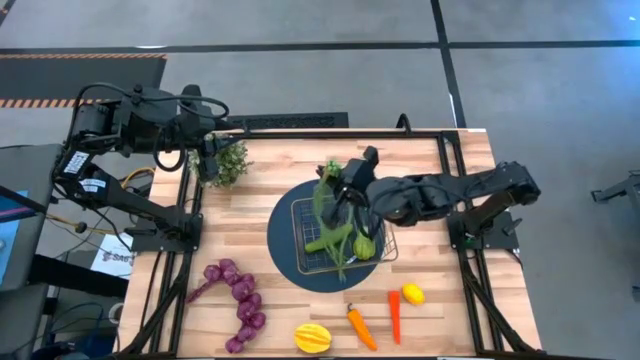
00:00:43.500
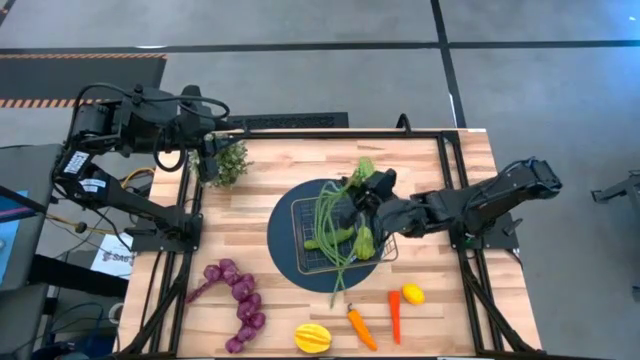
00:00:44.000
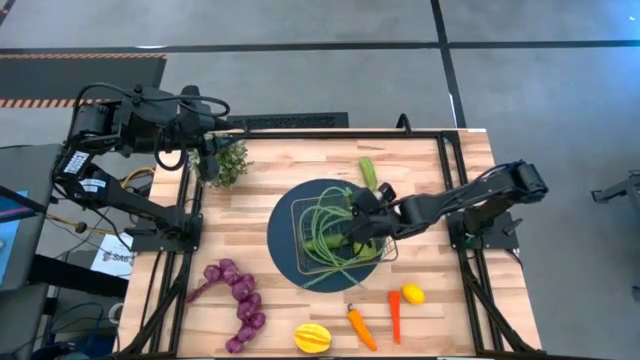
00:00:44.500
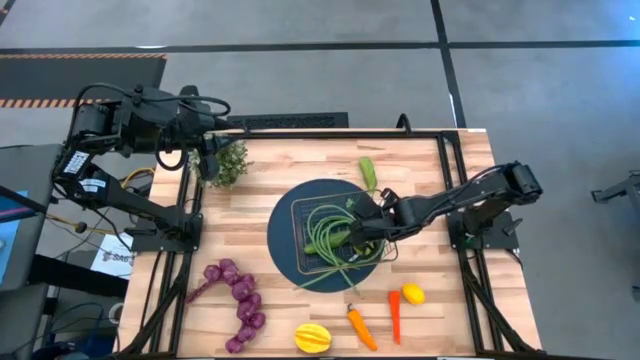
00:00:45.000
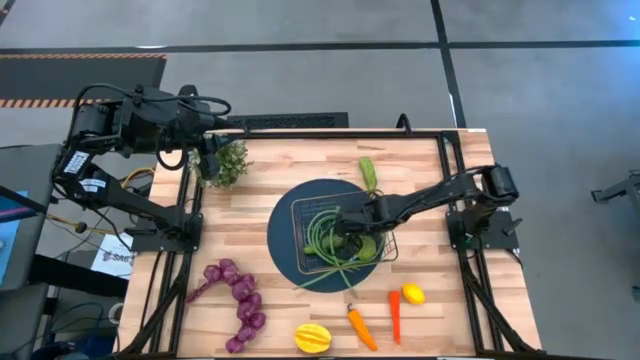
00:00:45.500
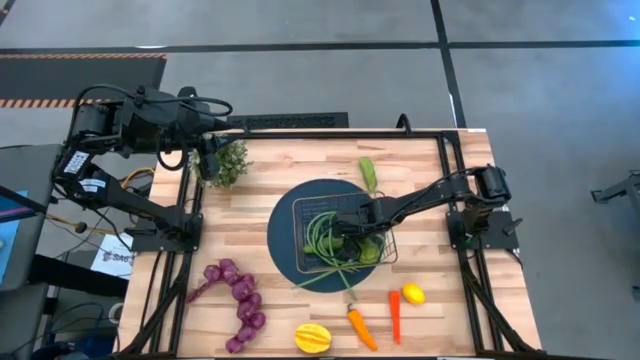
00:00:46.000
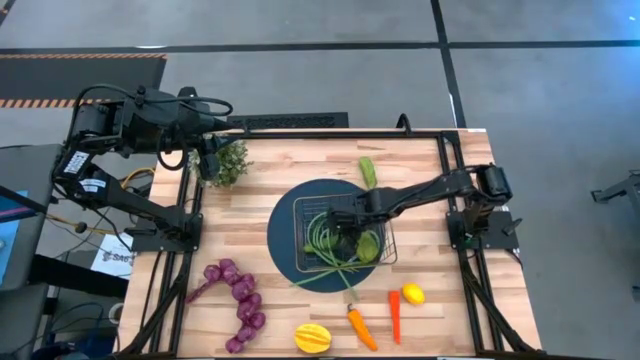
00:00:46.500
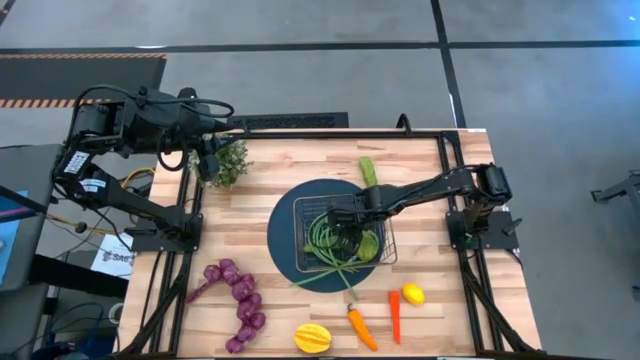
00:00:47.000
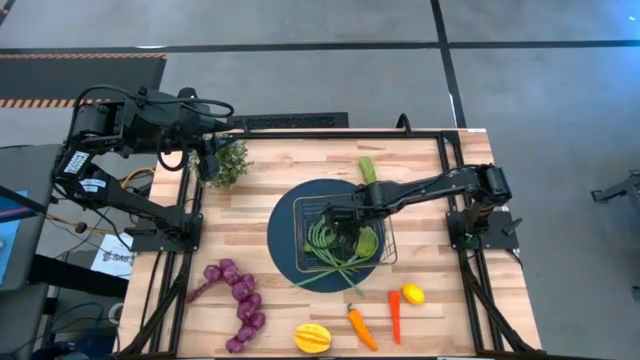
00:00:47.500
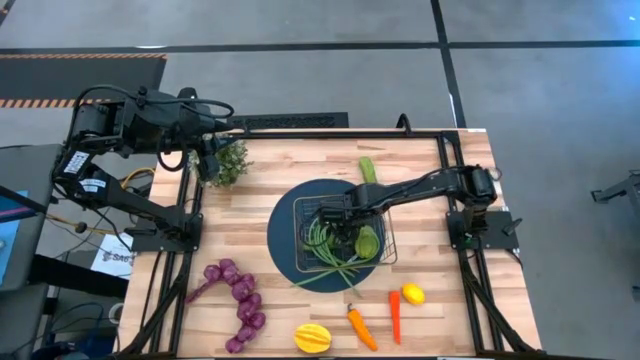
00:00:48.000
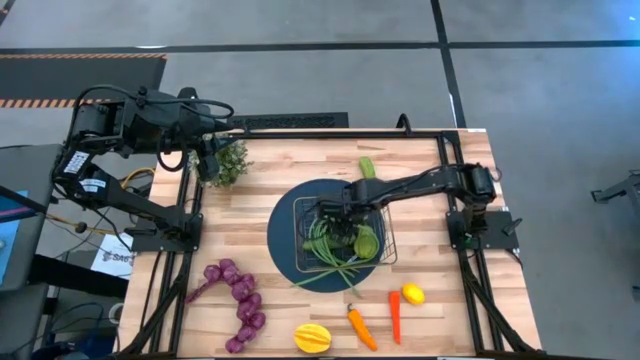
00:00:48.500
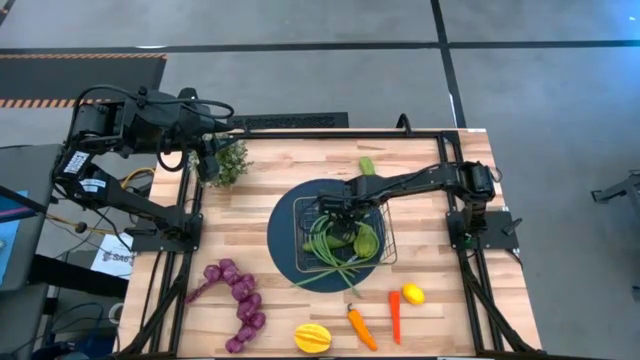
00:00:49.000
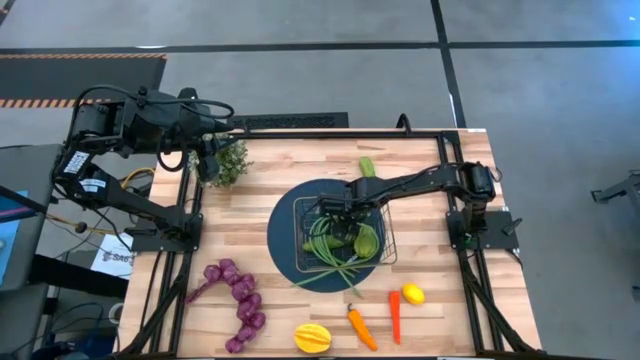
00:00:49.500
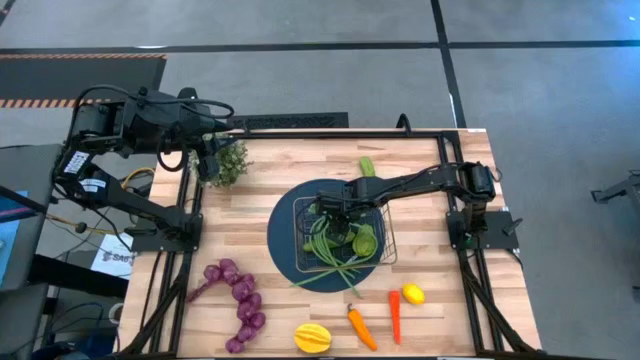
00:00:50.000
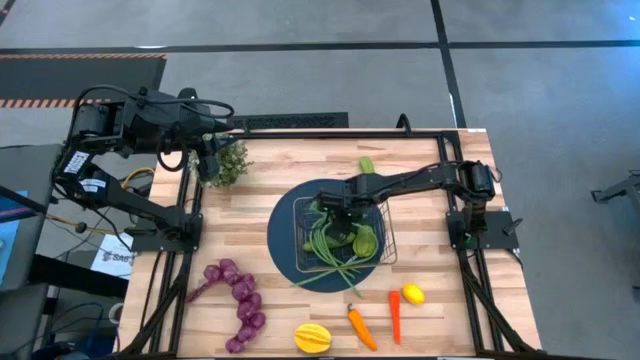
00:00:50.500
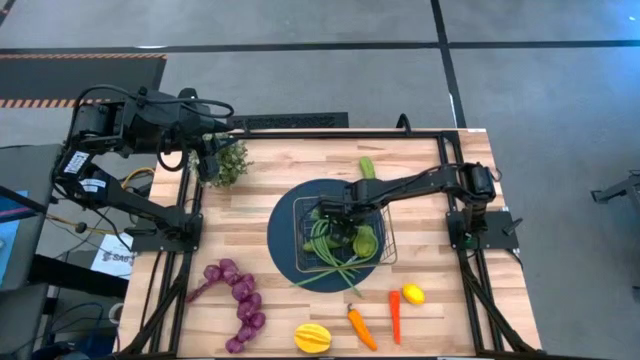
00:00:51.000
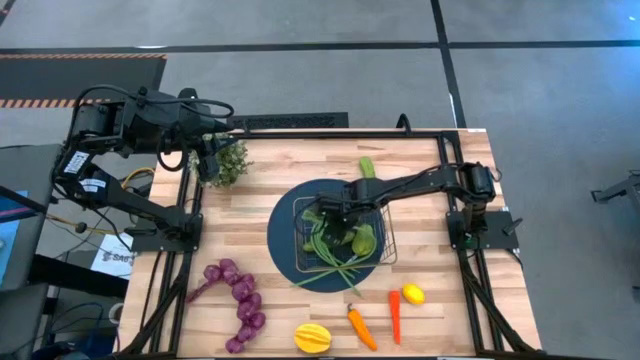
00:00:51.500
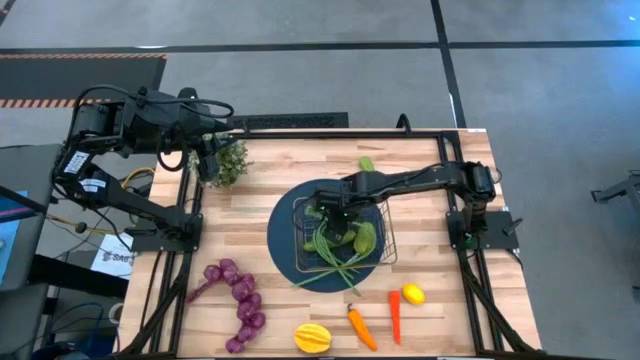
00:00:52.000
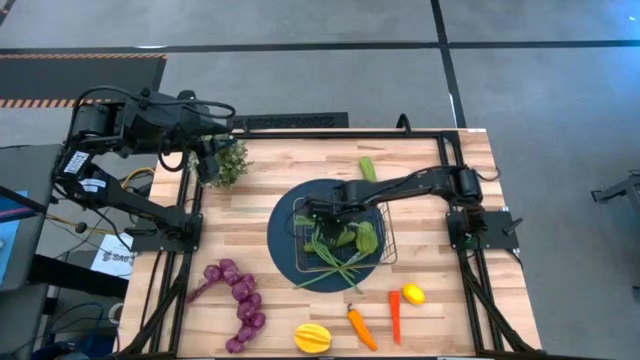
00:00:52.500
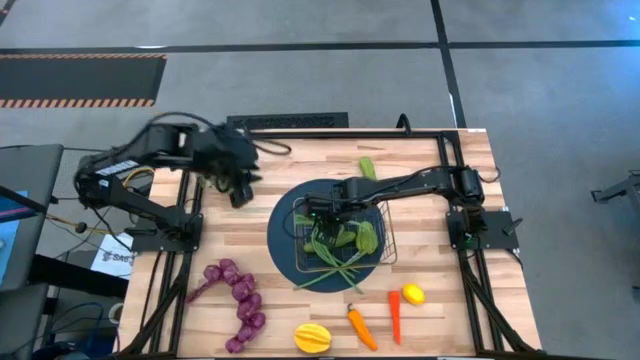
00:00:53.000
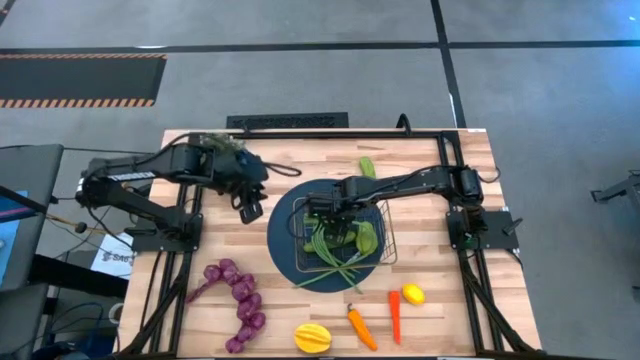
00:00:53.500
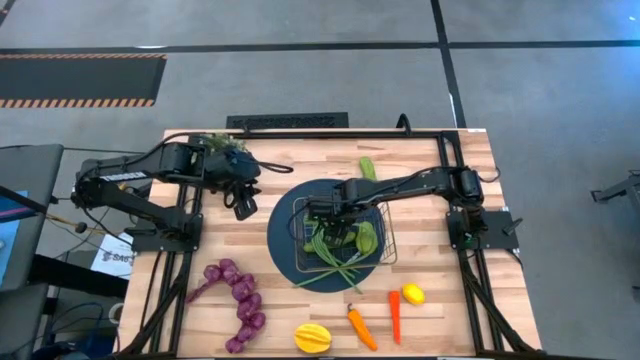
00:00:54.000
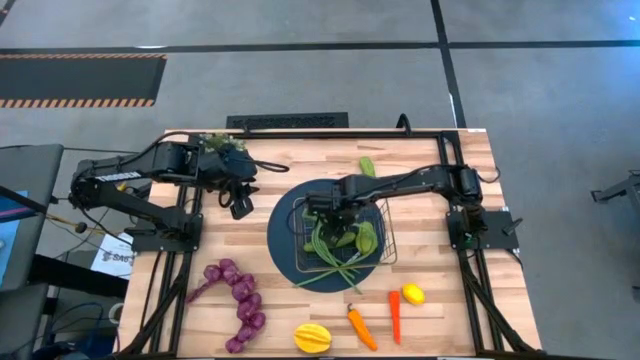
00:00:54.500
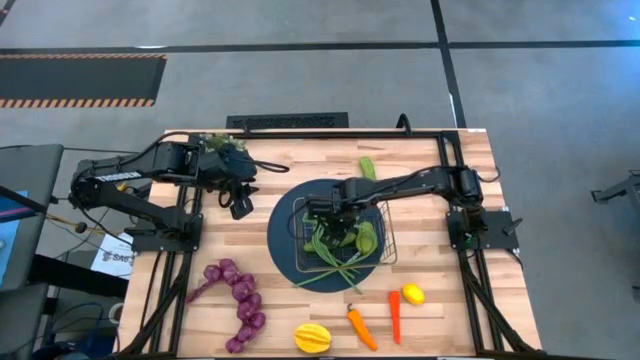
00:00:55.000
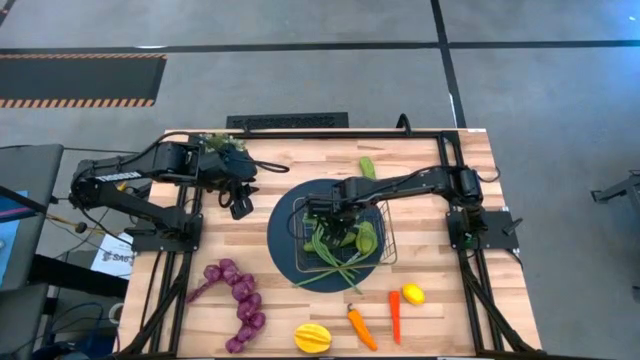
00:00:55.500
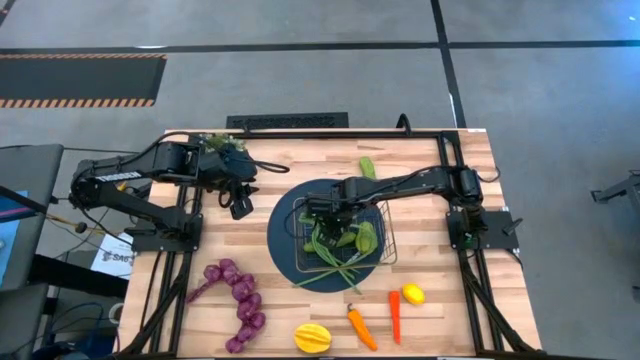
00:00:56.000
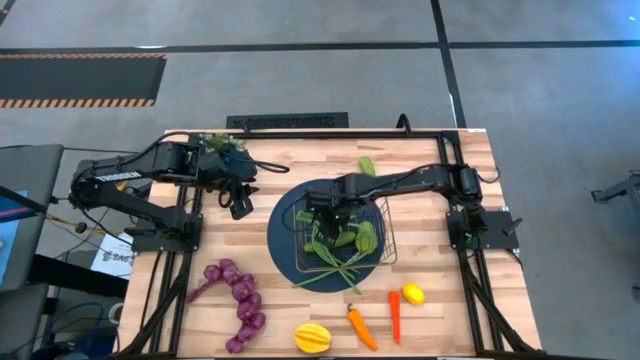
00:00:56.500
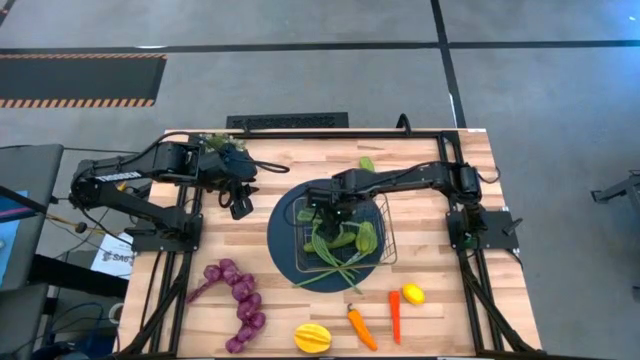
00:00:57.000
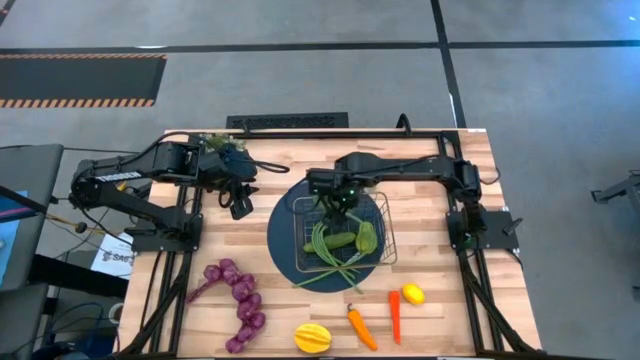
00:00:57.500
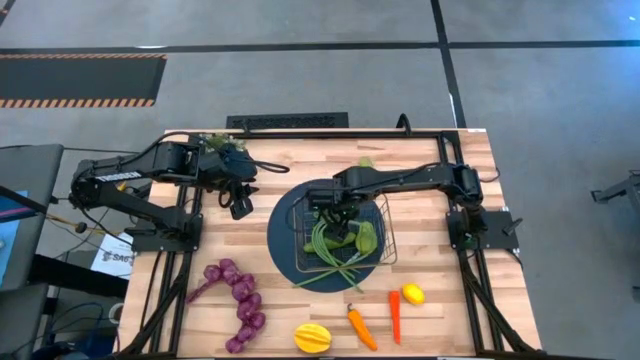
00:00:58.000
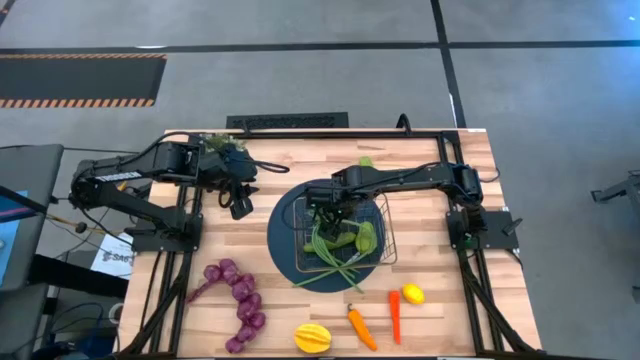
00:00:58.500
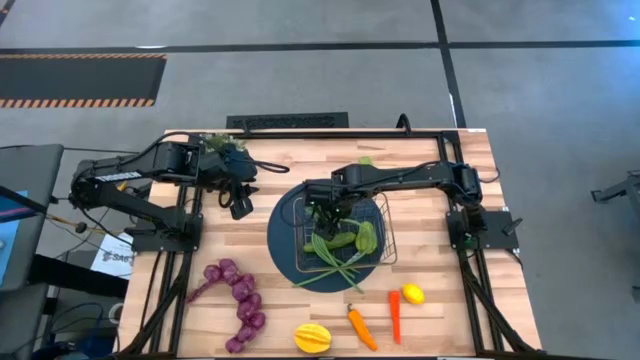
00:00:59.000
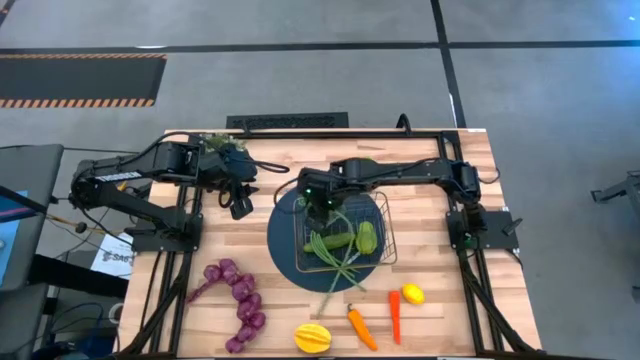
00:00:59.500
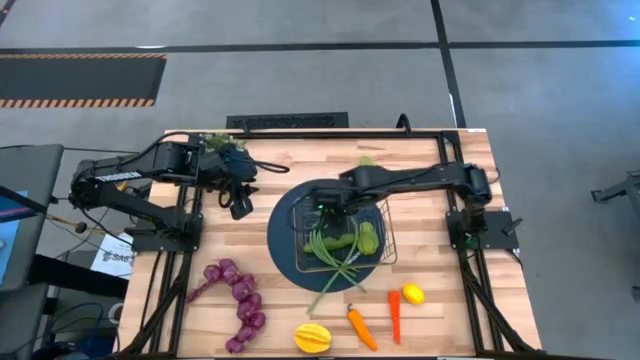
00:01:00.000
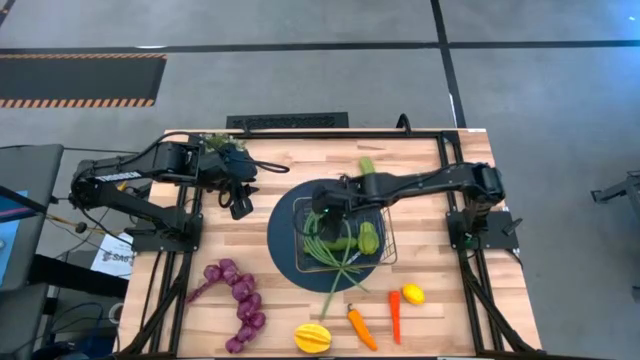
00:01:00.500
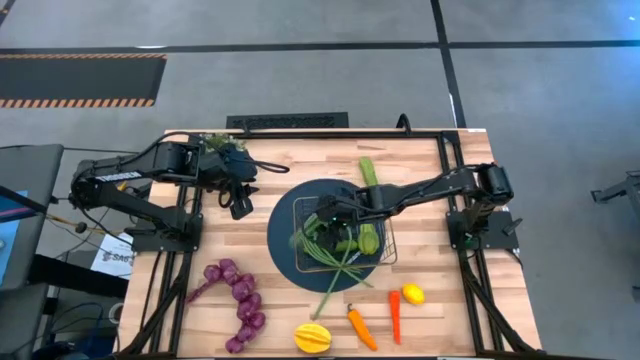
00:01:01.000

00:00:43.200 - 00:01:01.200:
Task: Build produce basket
Put the green beans into the gold wire basket

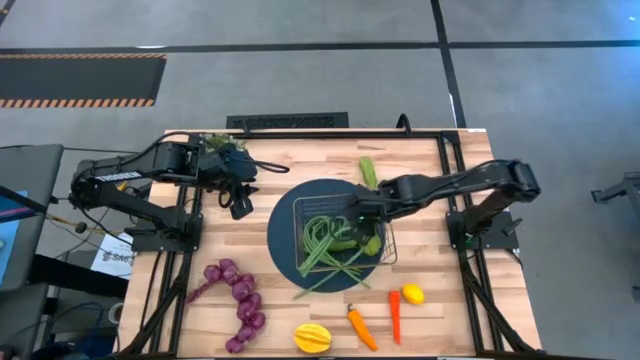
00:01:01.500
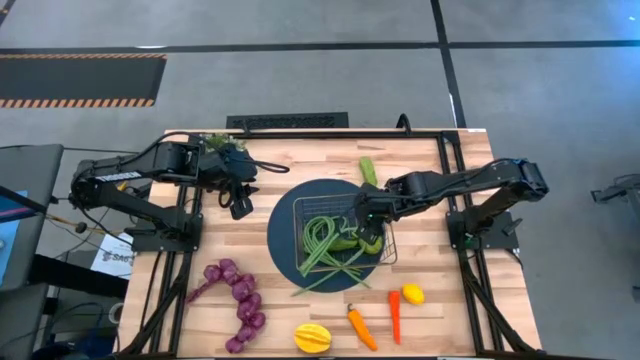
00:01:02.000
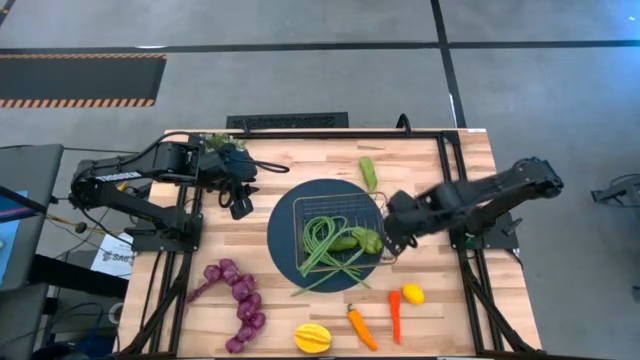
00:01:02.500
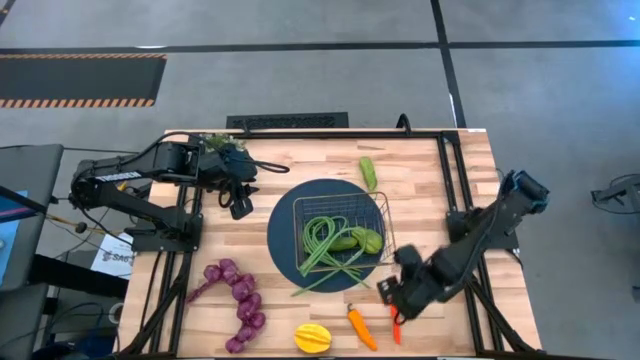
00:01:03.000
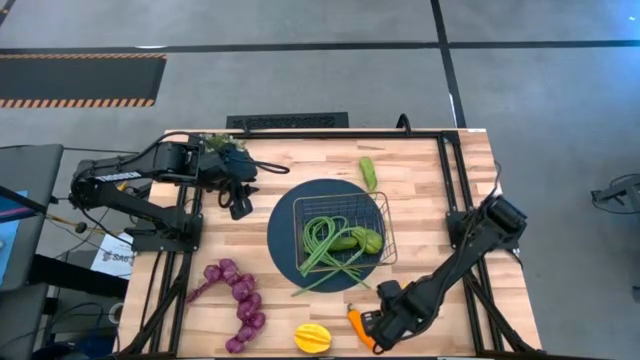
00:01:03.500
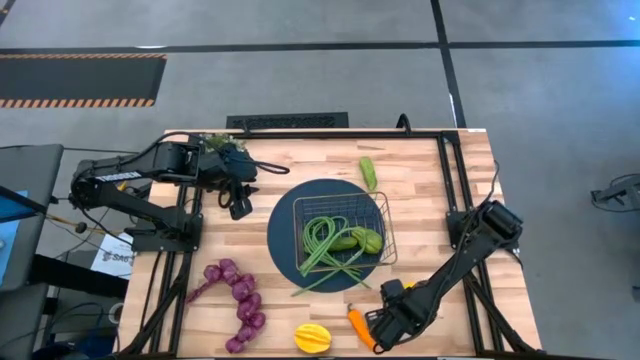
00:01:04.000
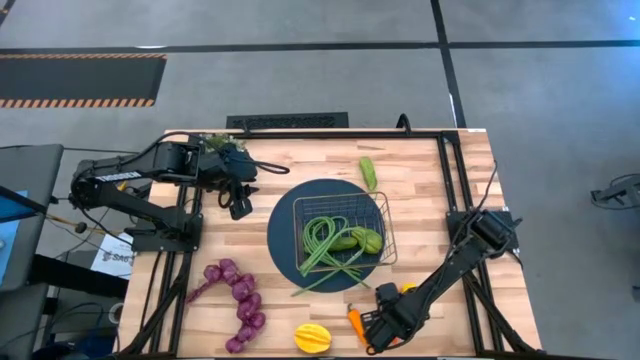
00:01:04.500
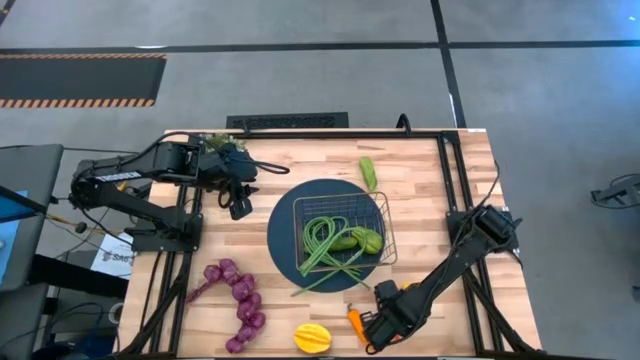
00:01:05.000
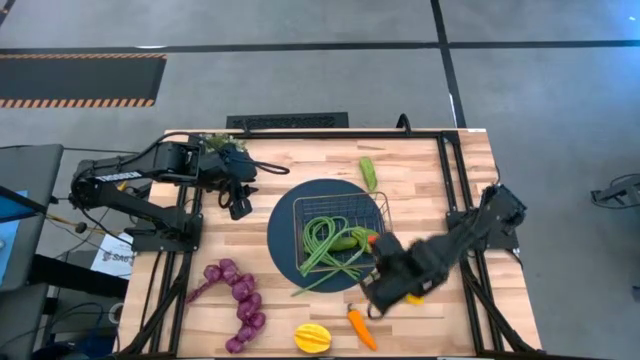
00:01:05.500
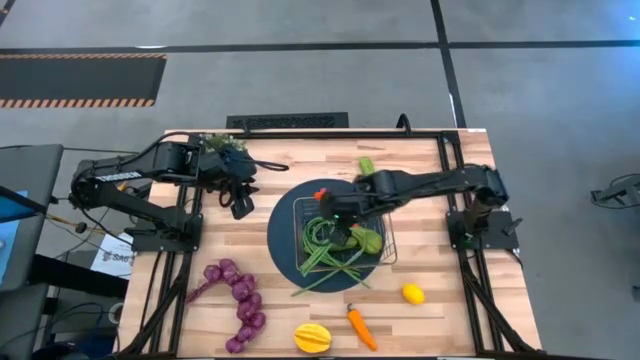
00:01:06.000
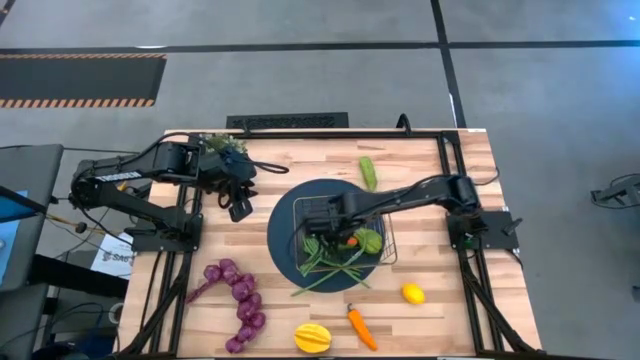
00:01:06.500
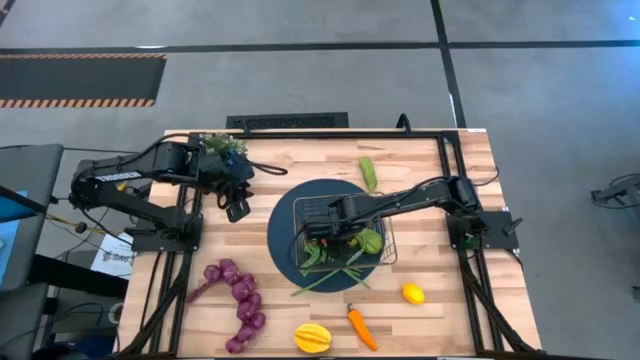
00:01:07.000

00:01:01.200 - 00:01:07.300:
Put the orange carrot into the gold wire basket
